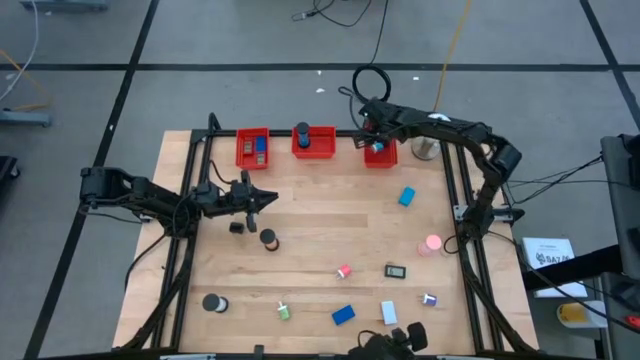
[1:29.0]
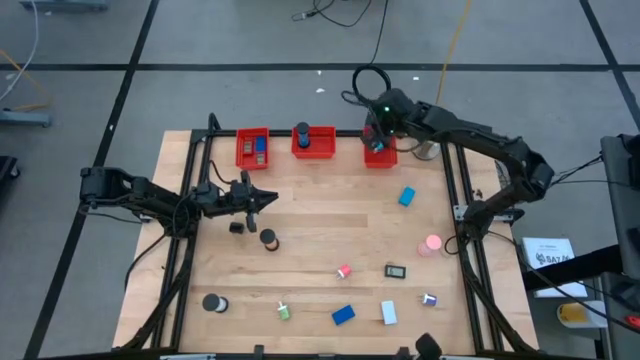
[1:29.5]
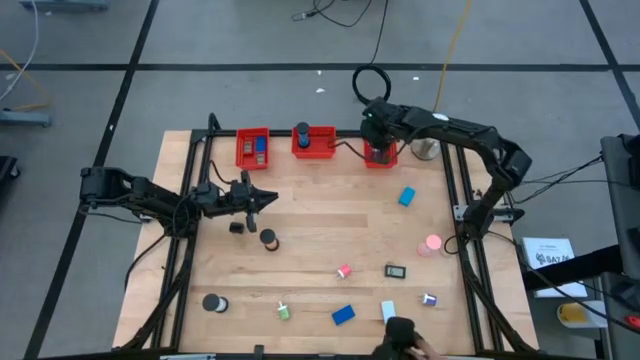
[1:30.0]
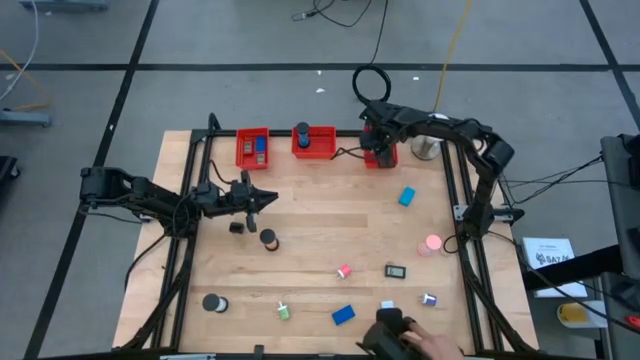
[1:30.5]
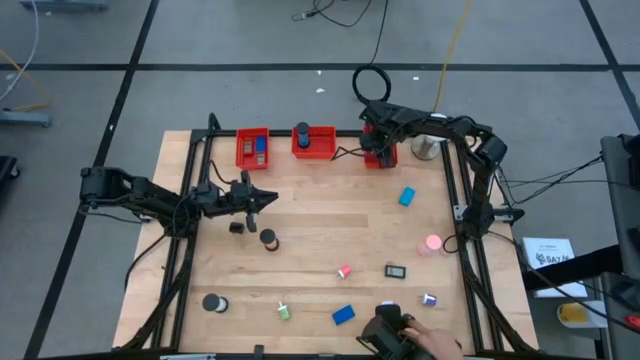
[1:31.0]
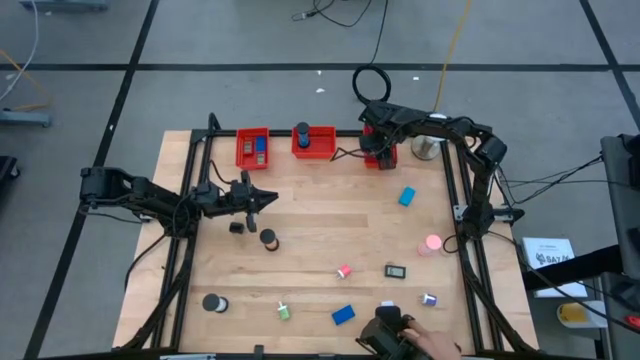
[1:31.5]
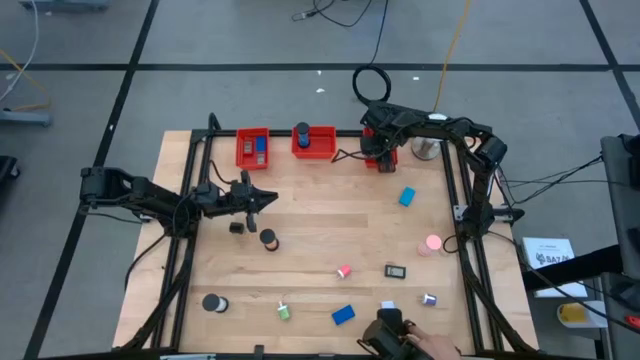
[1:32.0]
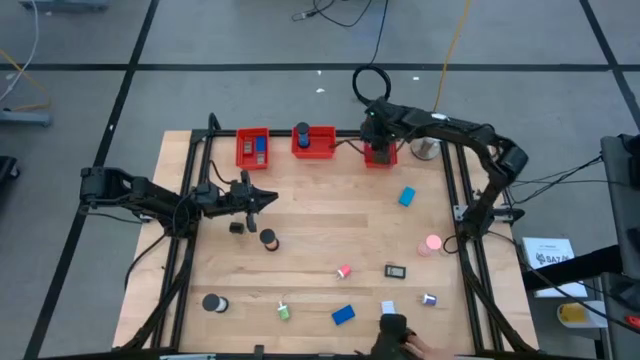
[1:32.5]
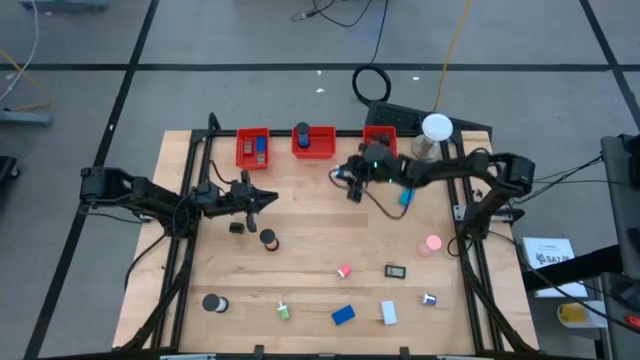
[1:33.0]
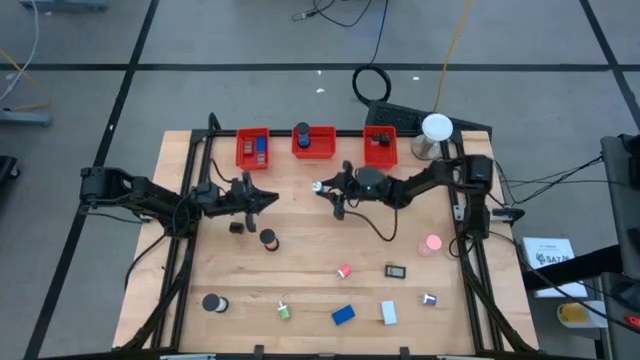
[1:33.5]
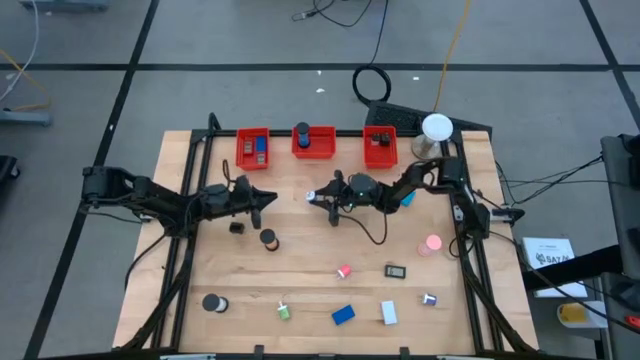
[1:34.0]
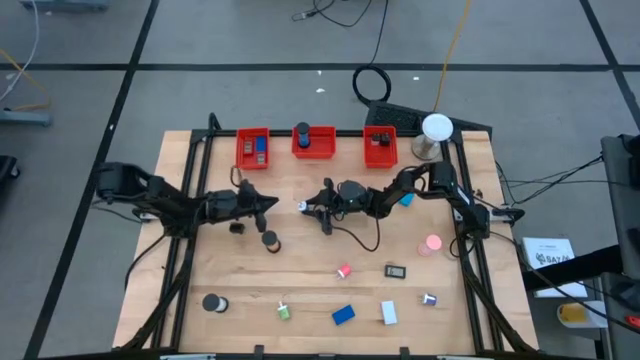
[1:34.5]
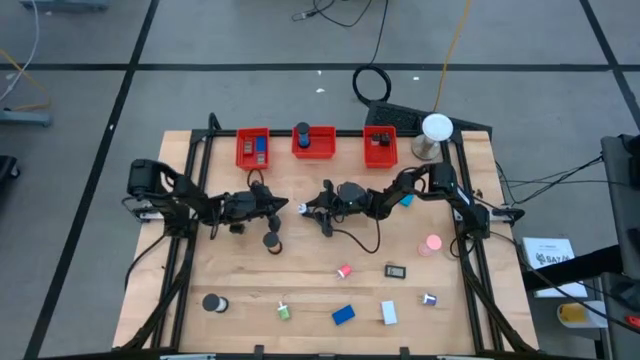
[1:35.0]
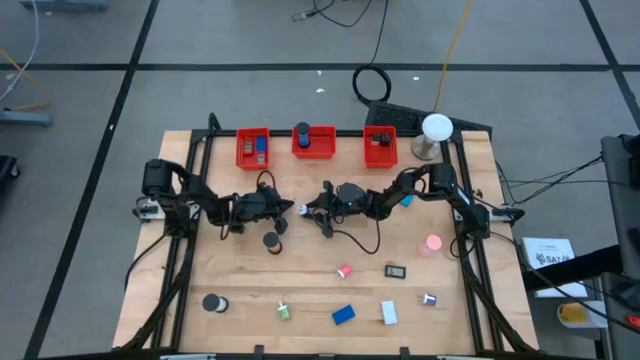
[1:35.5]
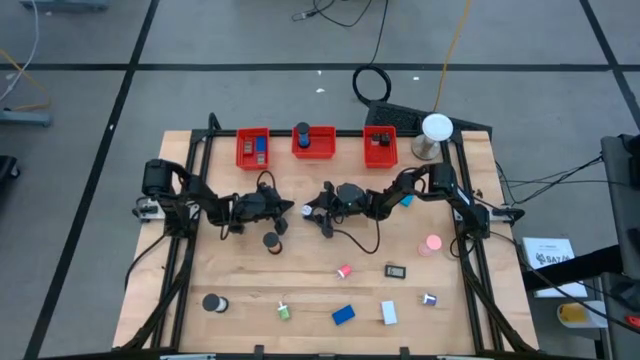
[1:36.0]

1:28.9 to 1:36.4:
Task: Pick & Place Office items
Remove the blue charger adapter from the right orange basket

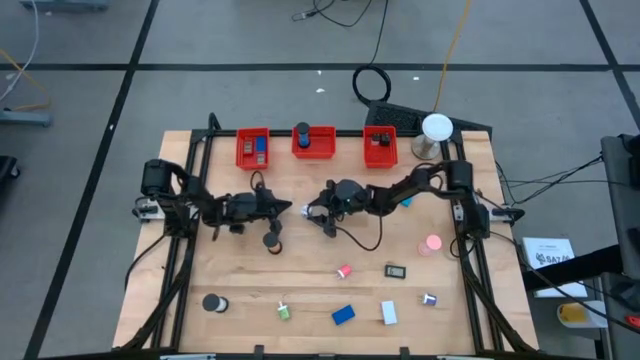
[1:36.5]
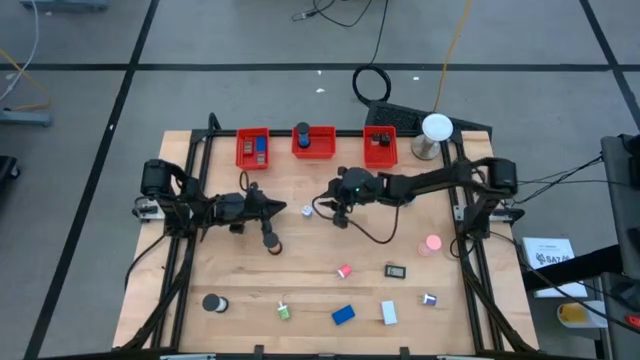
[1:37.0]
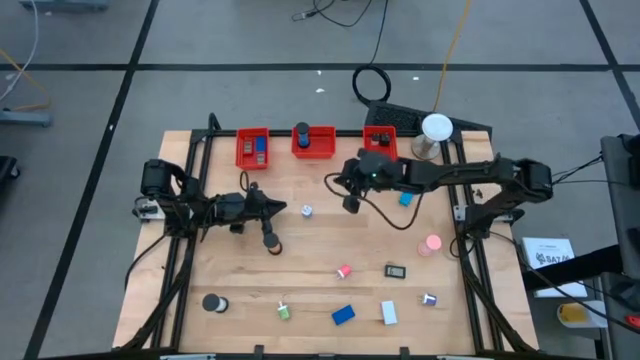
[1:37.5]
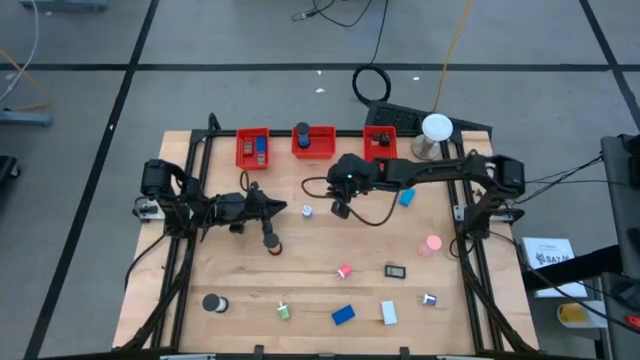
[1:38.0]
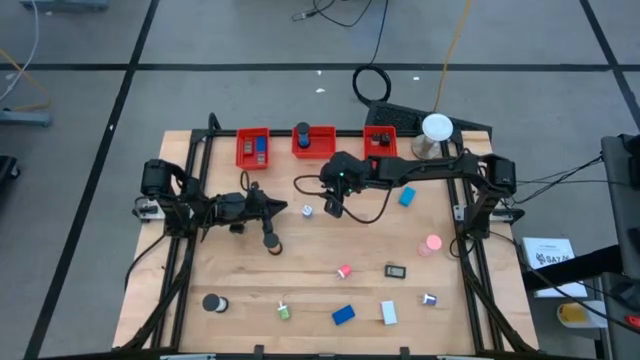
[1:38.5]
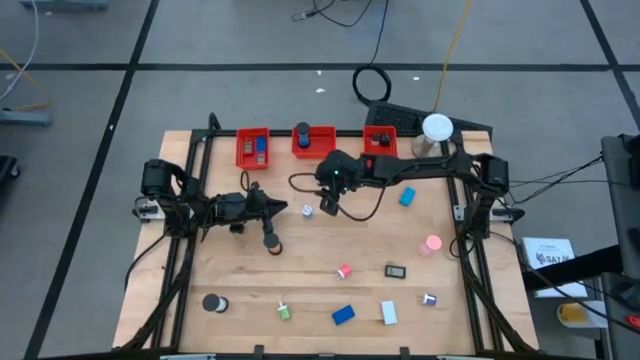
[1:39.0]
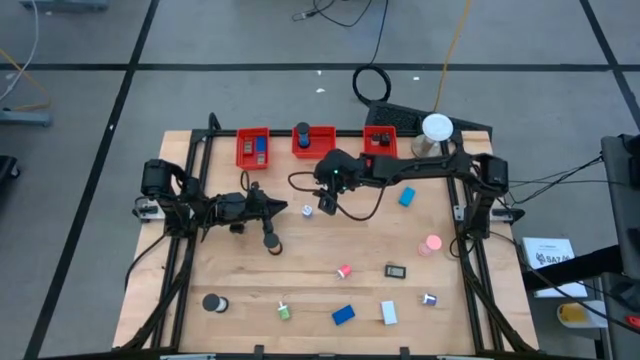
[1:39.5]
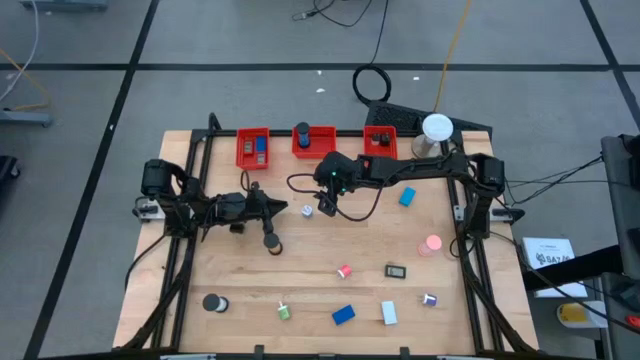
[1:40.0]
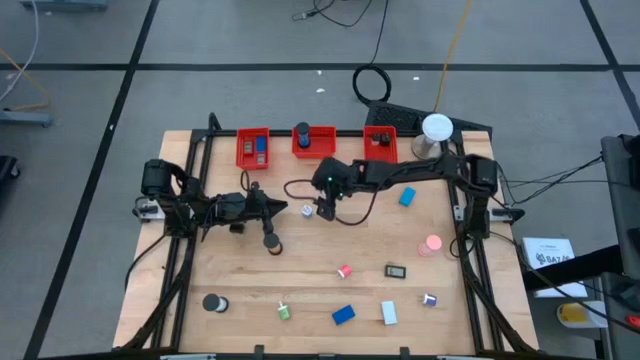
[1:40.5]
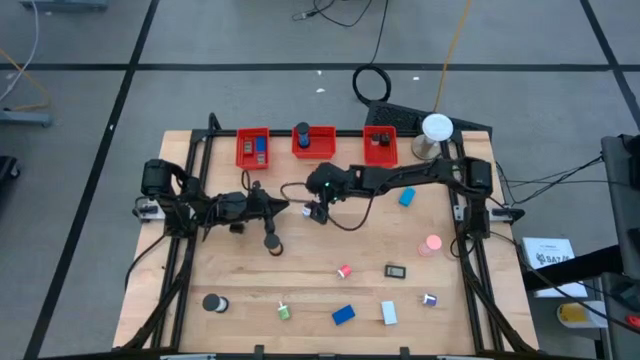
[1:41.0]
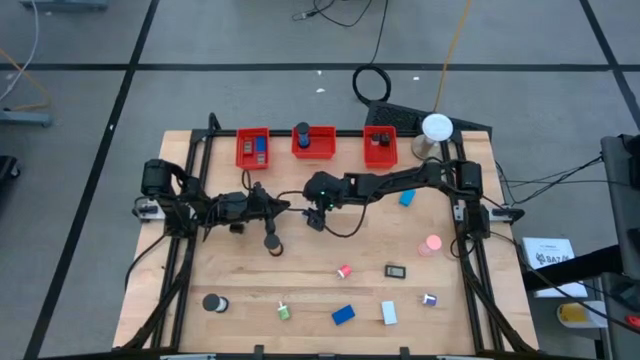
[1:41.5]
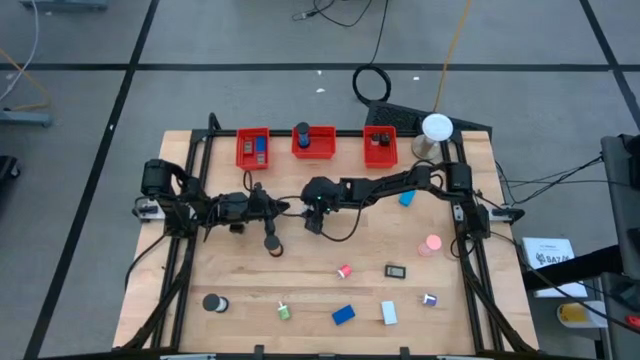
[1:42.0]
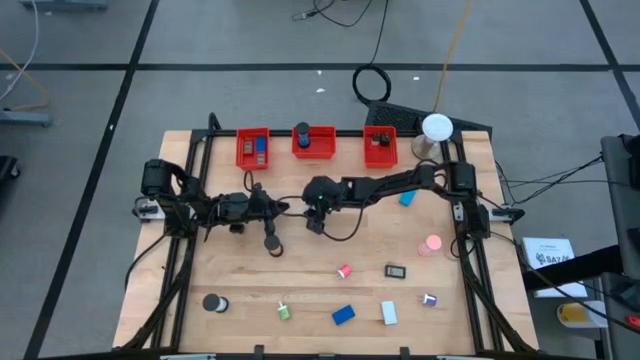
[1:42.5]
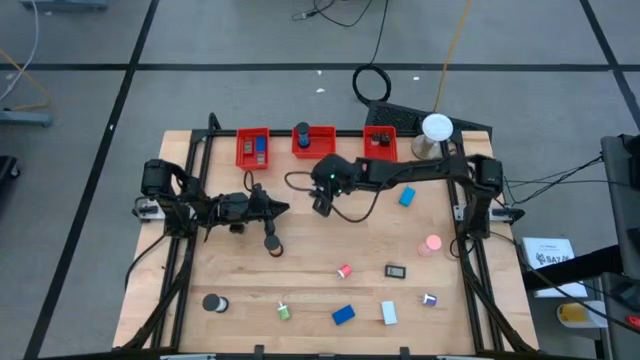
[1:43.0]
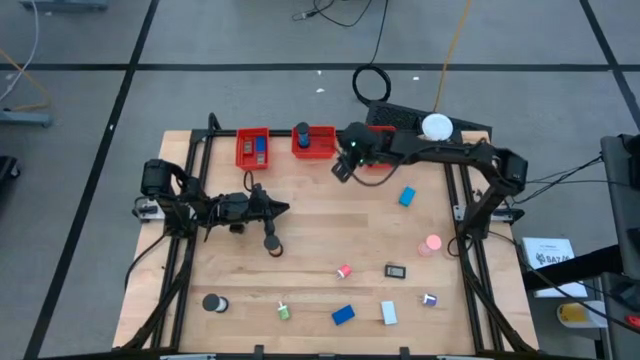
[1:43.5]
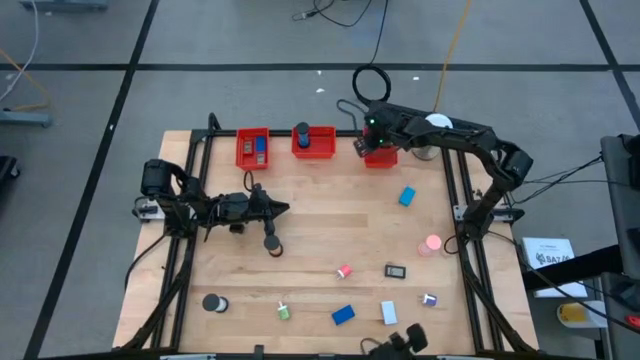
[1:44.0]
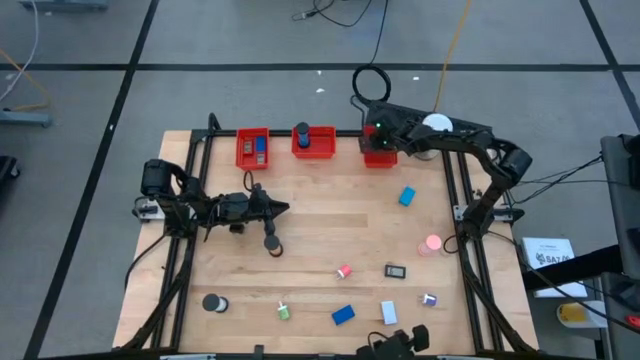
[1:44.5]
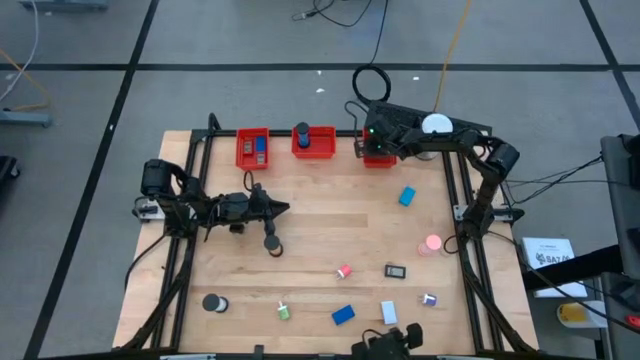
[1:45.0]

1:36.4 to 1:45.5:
Put the blue charger adapter into the right orange basket

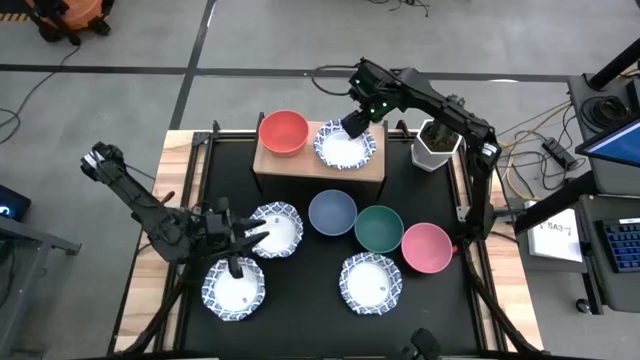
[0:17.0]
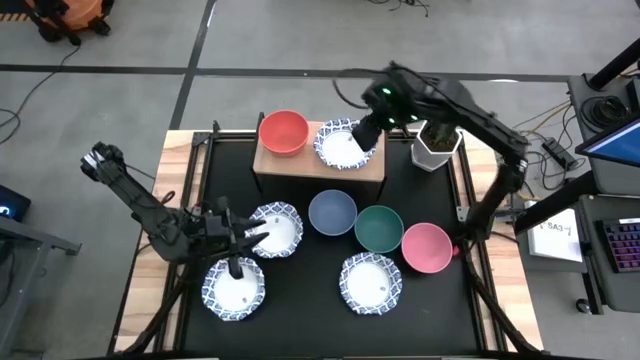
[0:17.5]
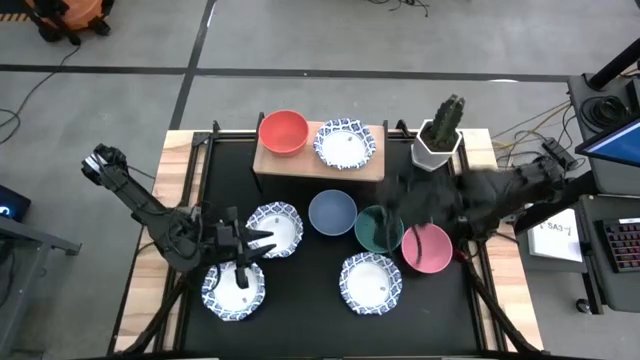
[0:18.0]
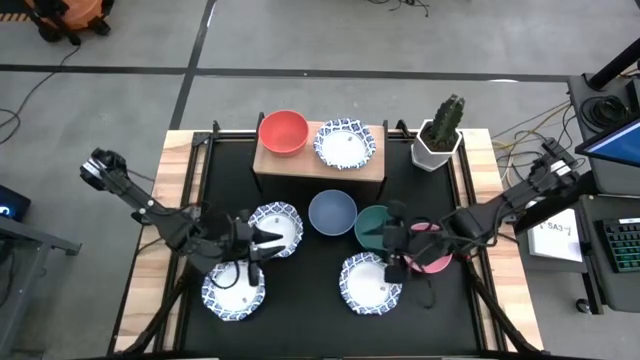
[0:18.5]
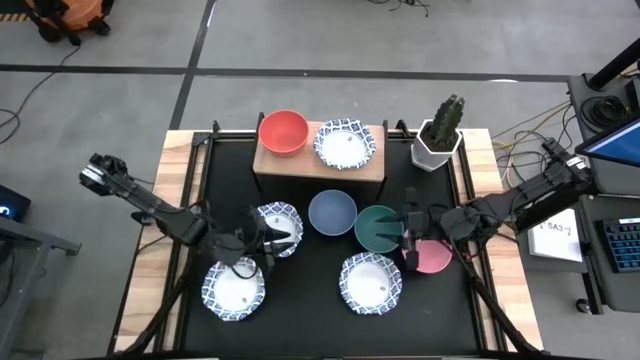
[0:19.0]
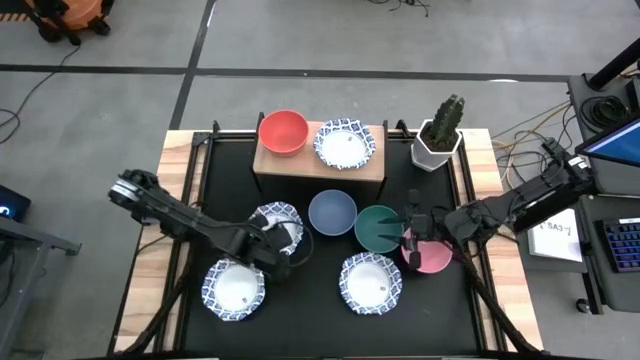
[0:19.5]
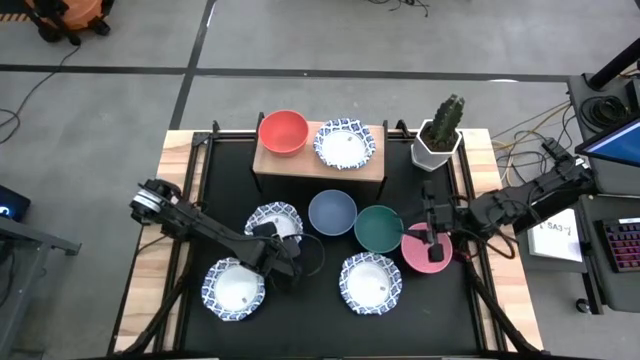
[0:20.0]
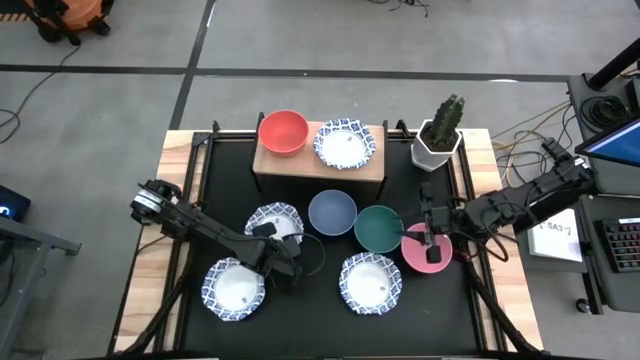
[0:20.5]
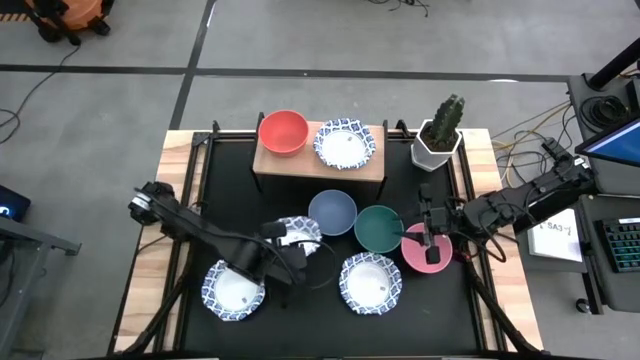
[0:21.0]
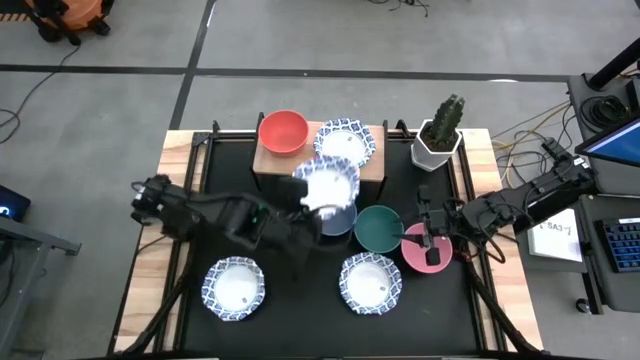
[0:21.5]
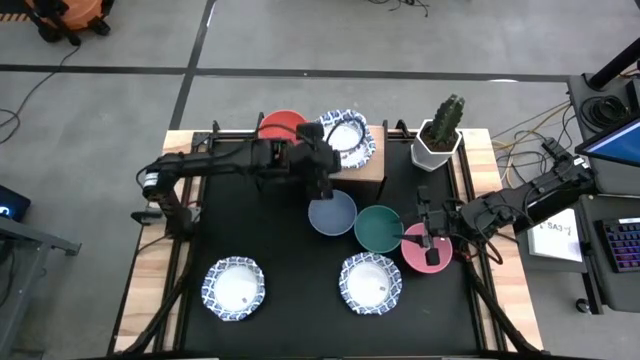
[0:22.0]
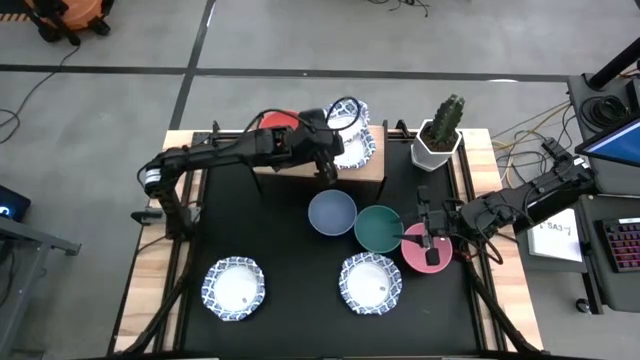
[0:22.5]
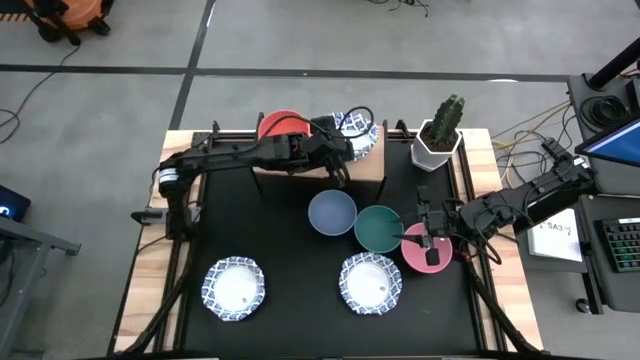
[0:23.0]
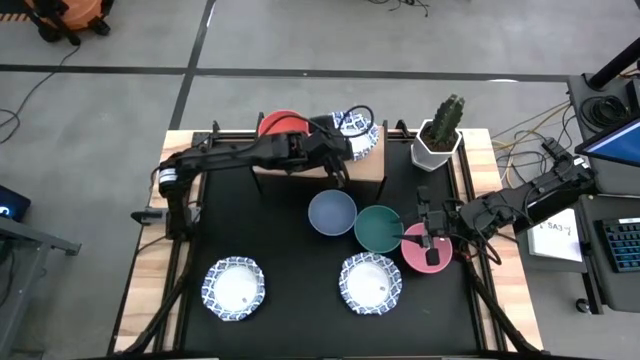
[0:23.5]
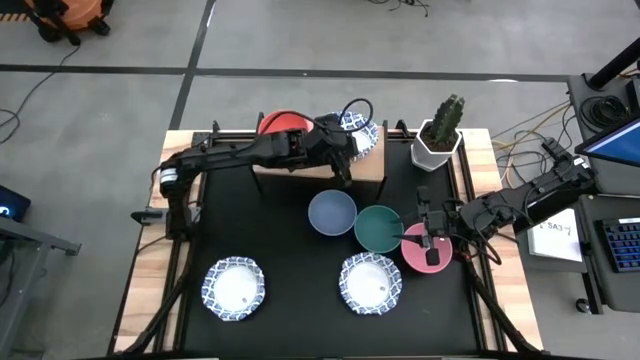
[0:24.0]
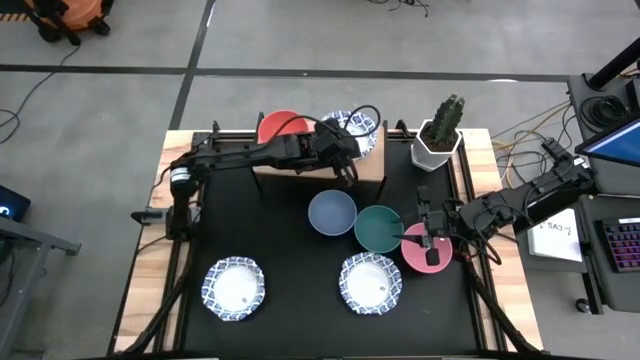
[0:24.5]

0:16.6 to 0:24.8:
Task: Place and stack bowls onto a shelf
Stack the white bowl on top of the white bowl on the shelf
